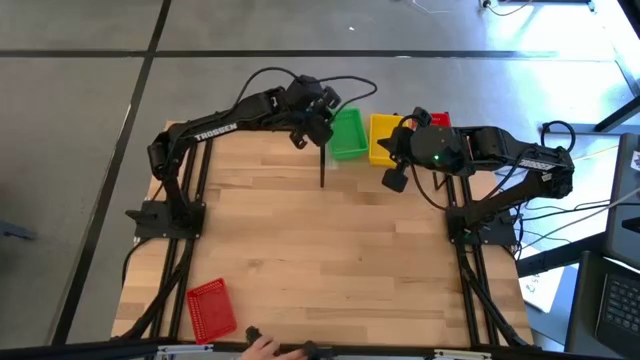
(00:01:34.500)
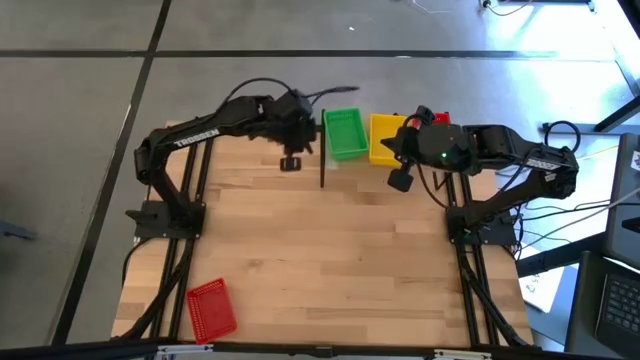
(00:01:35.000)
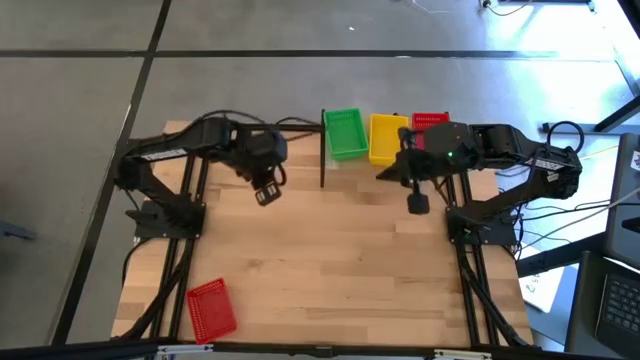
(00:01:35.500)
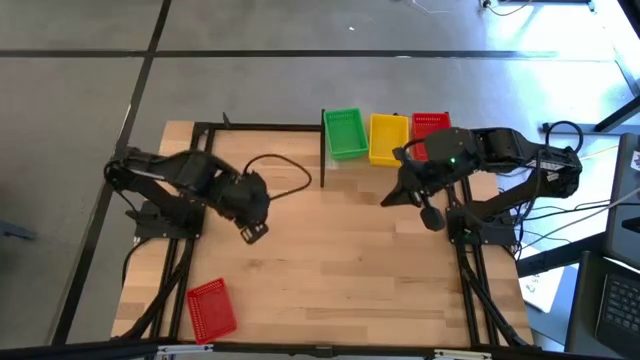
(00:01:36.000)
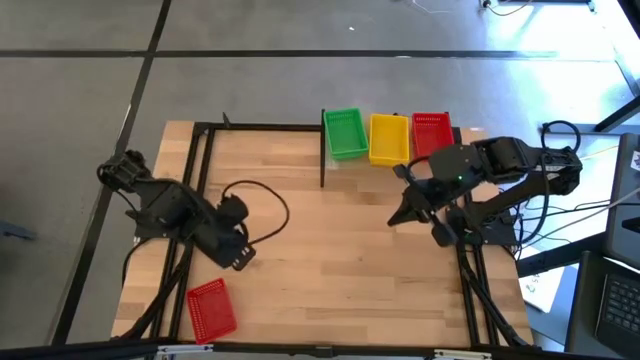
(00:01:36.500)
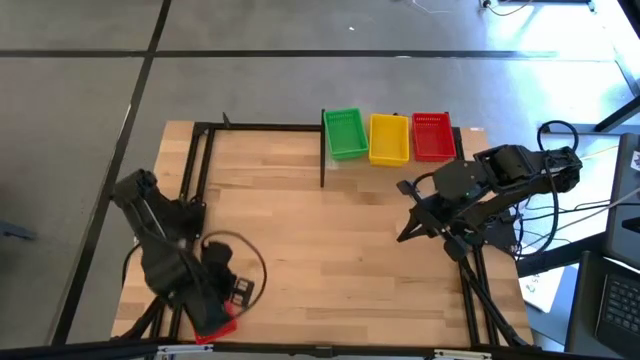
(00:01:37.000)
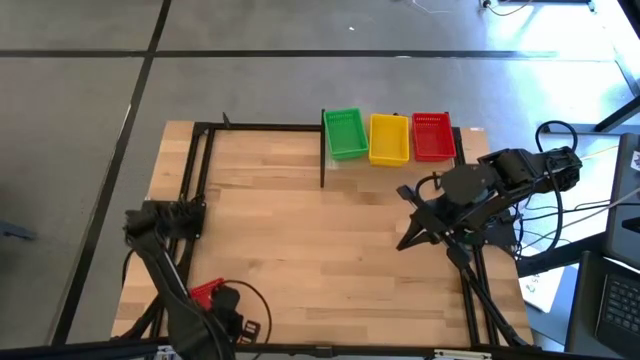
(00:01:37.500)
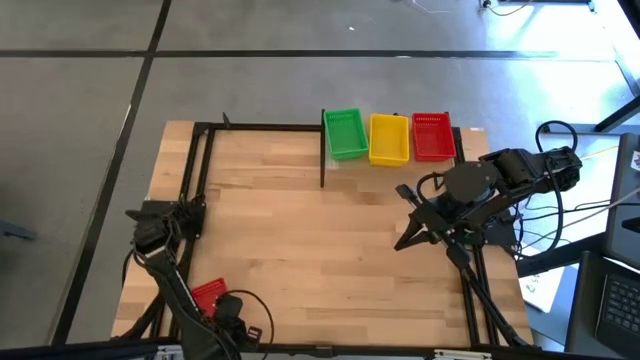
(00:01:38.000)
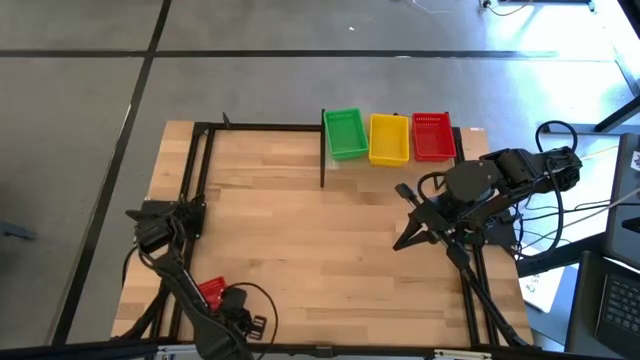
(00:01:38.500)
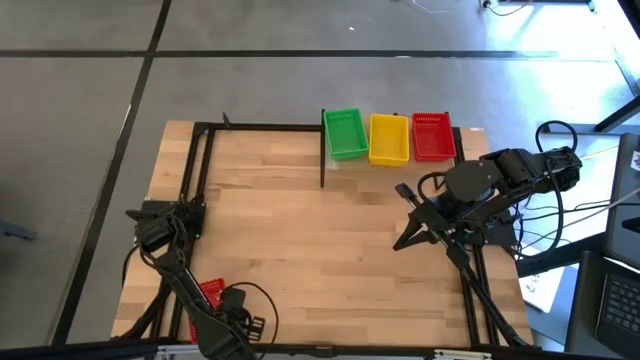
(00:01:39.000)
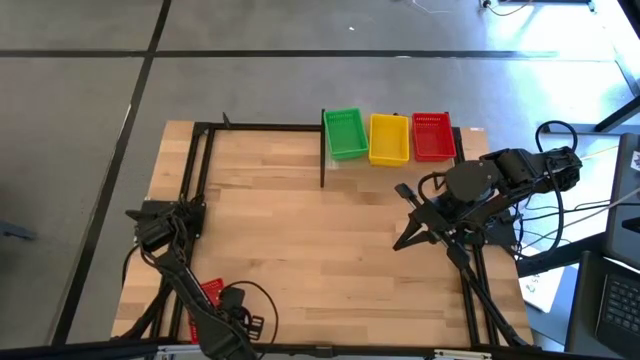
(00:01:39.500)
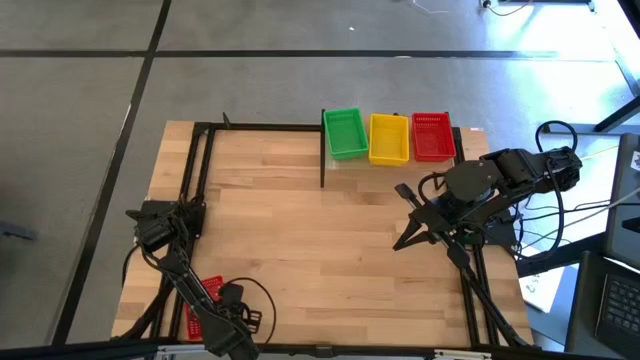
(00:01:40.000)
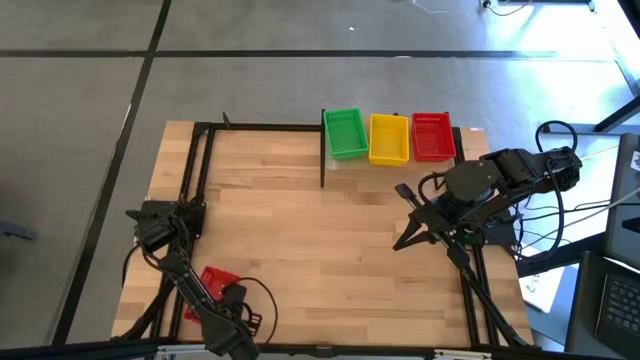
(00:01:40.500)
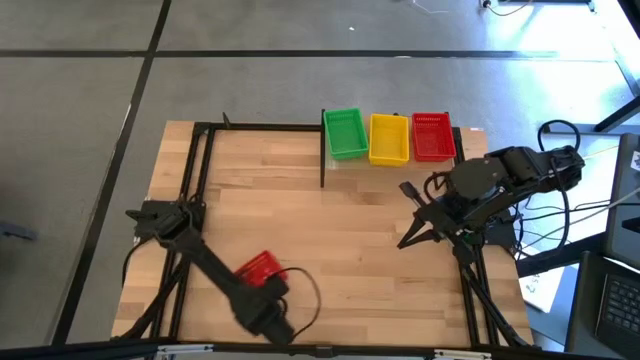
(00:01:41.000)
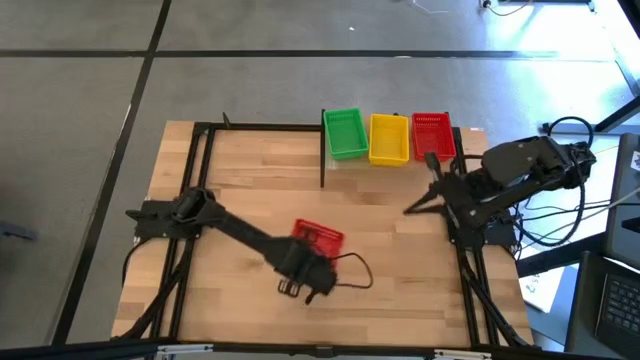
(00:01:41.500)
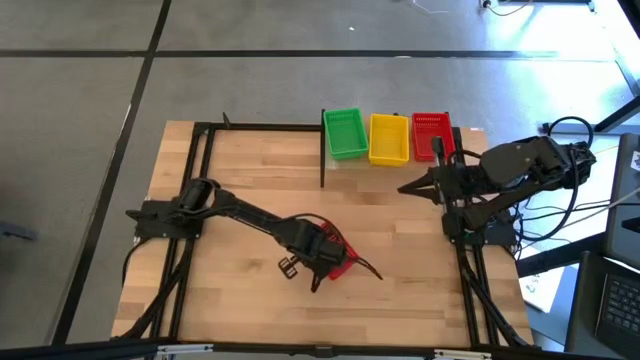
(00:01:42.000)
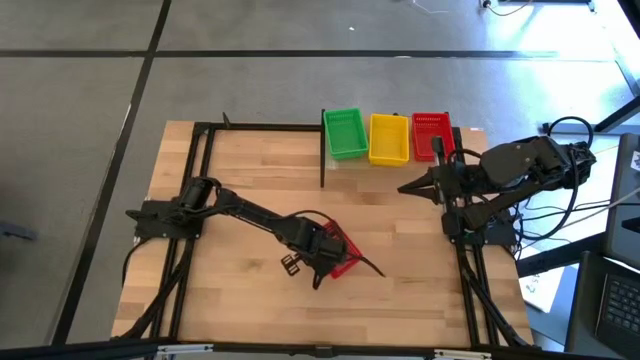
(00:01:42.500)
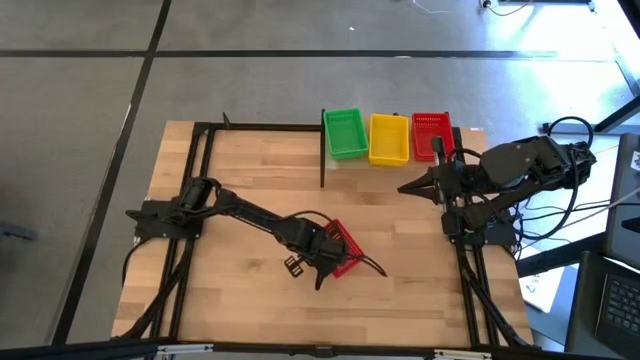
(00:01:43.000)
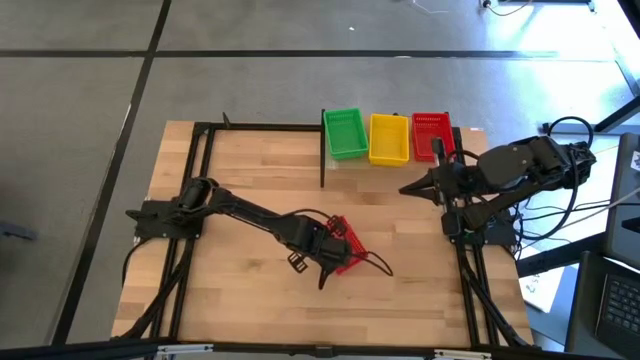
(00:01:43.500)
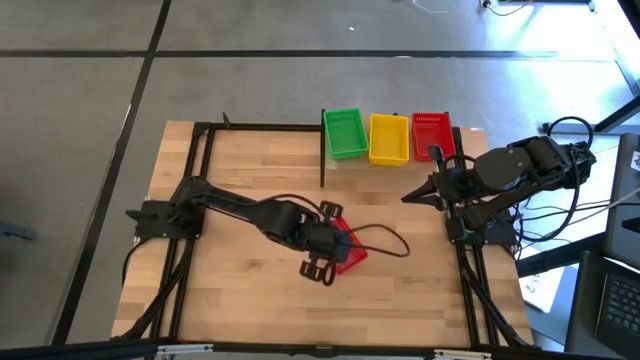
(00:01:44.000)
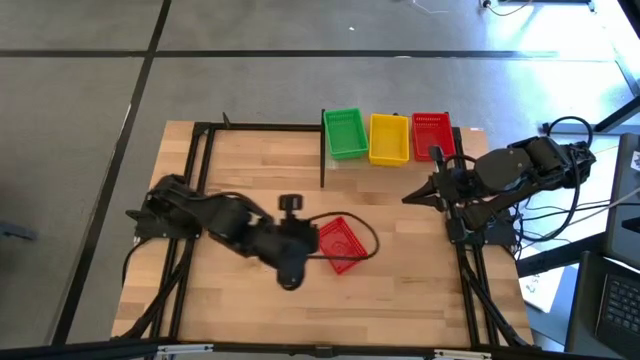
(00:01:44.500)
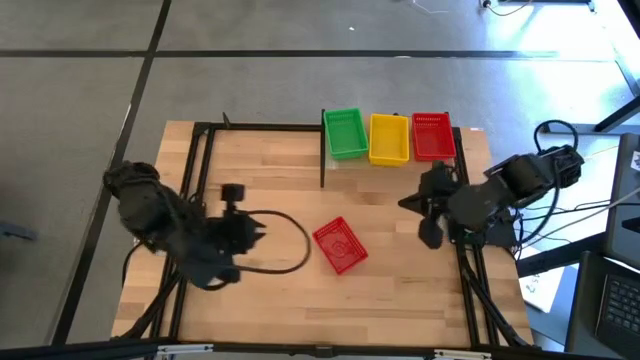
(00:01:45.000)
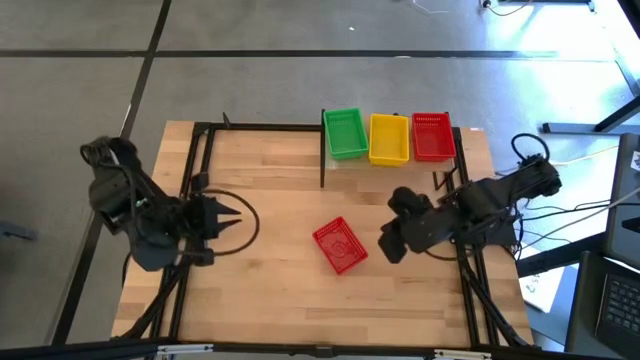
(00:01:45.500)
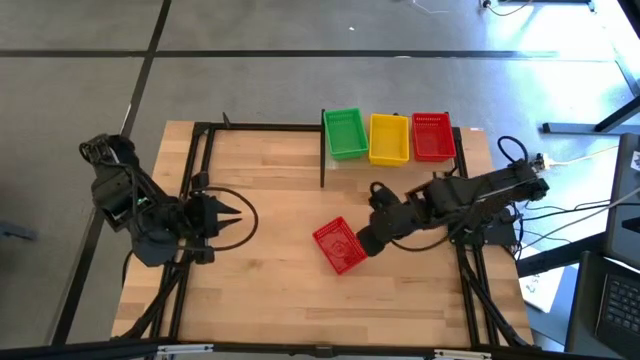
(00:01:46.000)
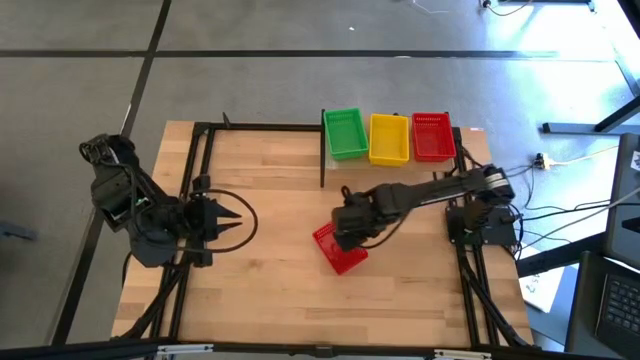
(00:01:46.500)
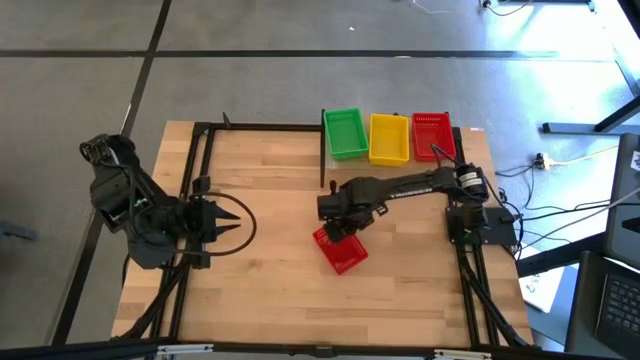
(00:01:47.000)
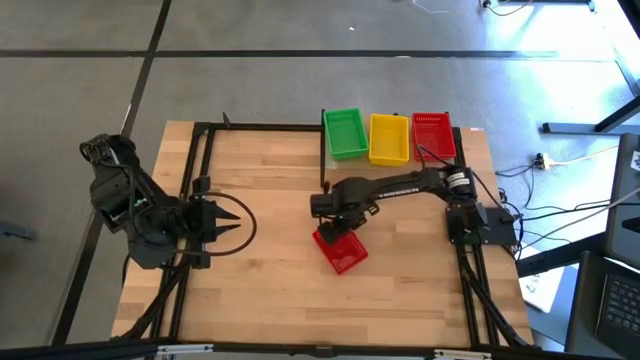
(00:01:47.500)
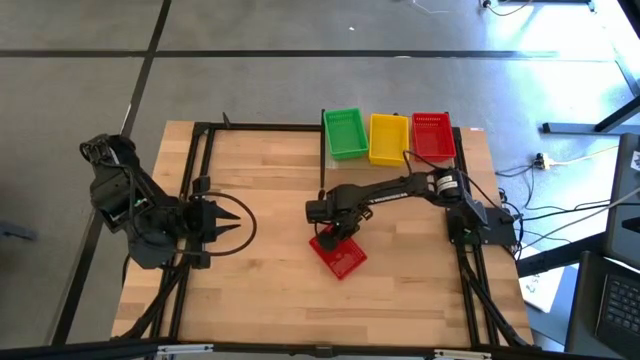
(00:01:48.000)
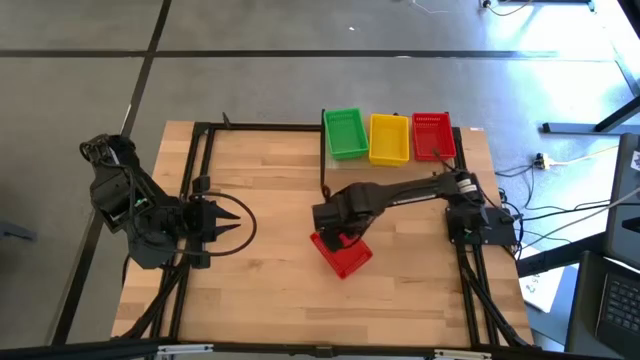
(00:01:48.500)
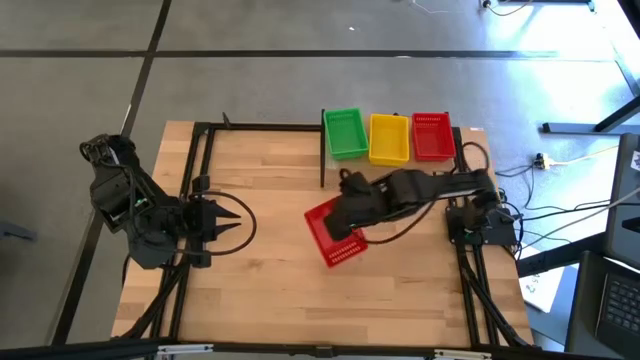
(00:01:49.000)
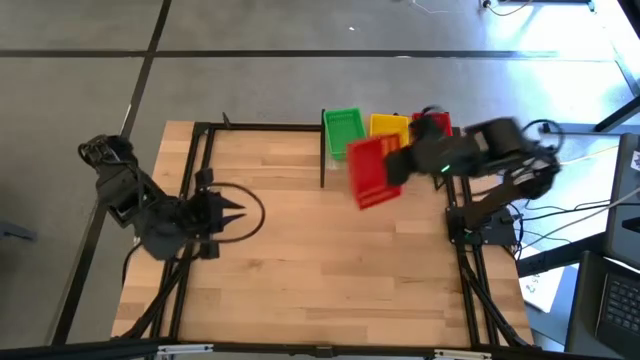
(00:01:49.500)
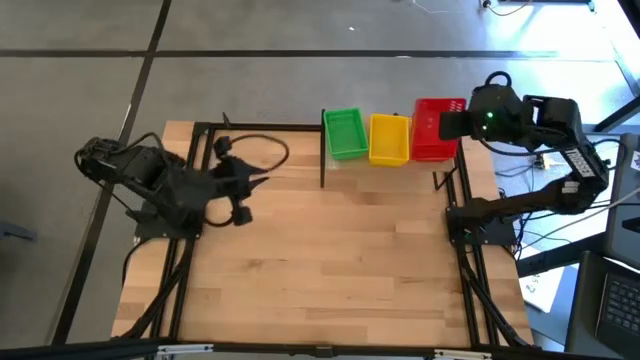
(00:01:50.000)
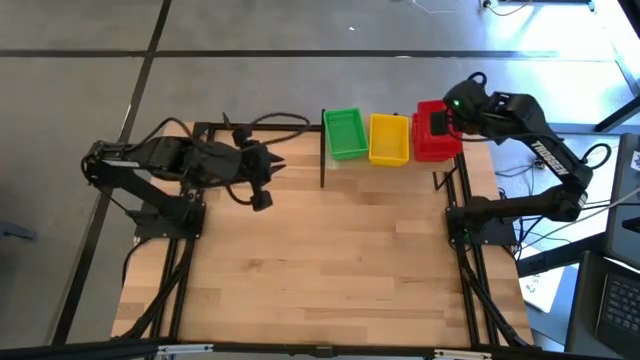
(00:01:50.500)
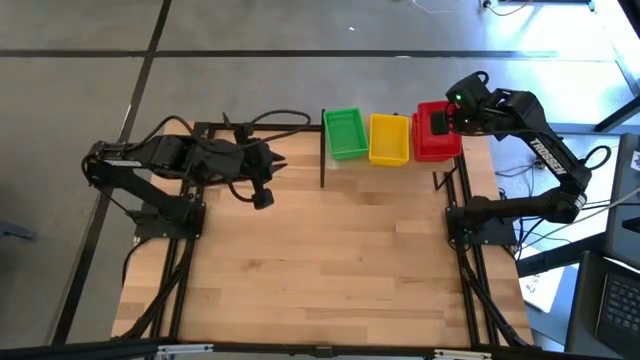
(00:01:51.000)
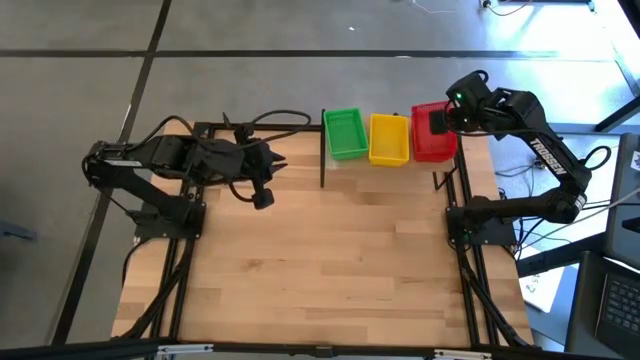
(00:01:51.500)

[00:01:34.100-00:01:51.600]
Task: Stack baskets on shelf by color
Stack the red bin on the red bins on the shelf

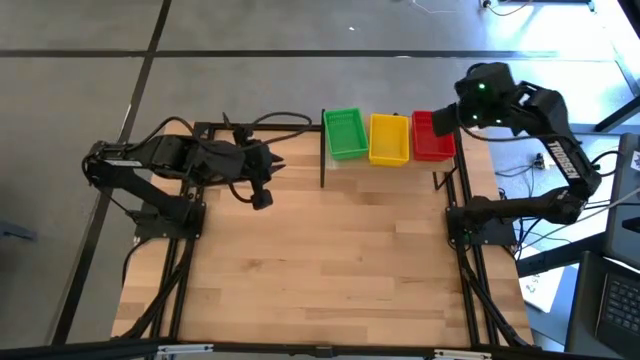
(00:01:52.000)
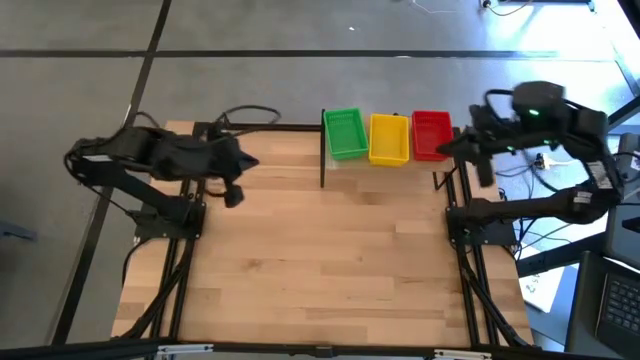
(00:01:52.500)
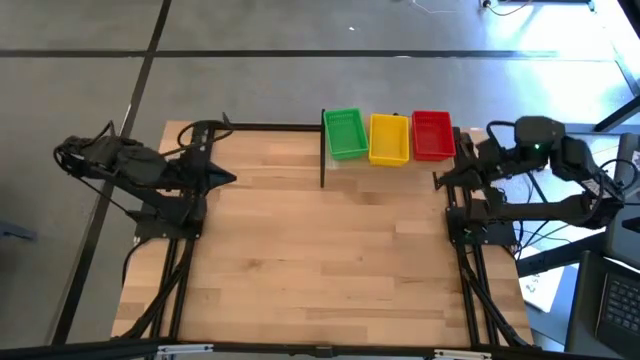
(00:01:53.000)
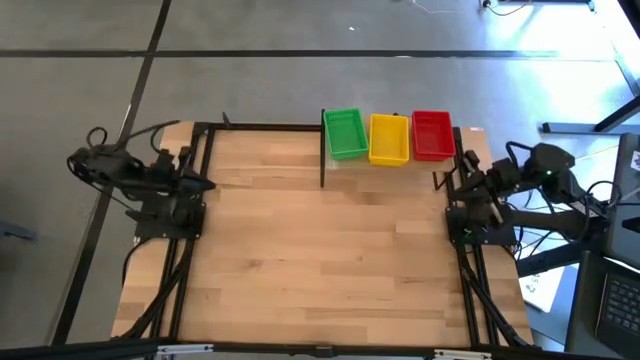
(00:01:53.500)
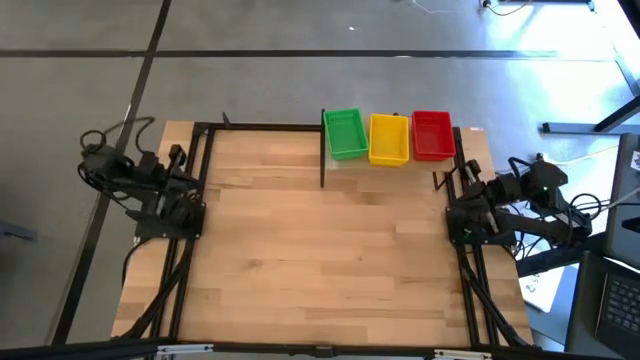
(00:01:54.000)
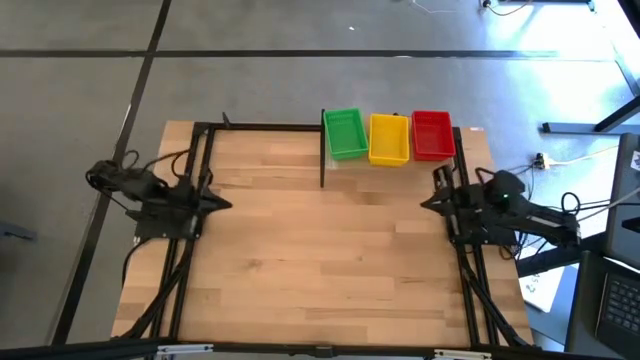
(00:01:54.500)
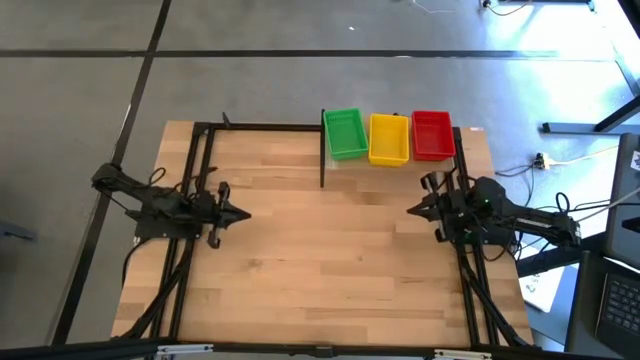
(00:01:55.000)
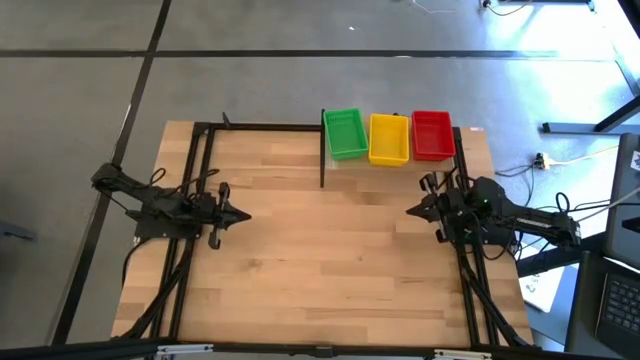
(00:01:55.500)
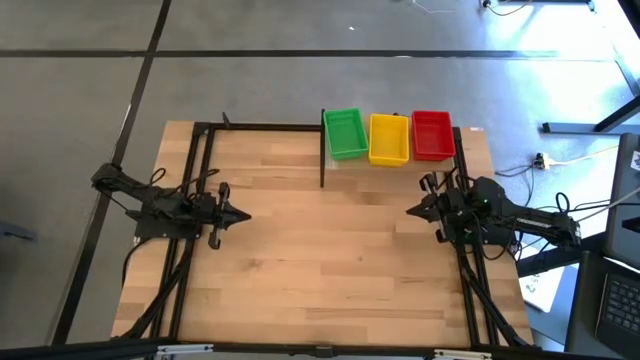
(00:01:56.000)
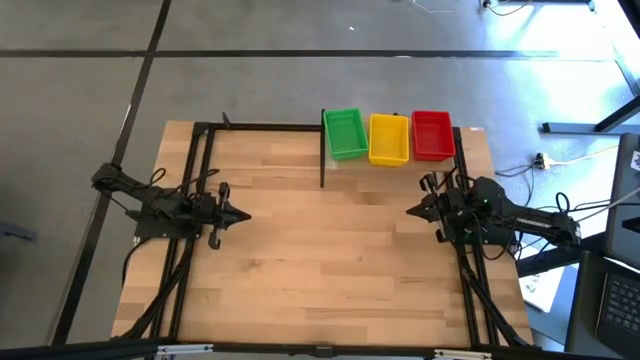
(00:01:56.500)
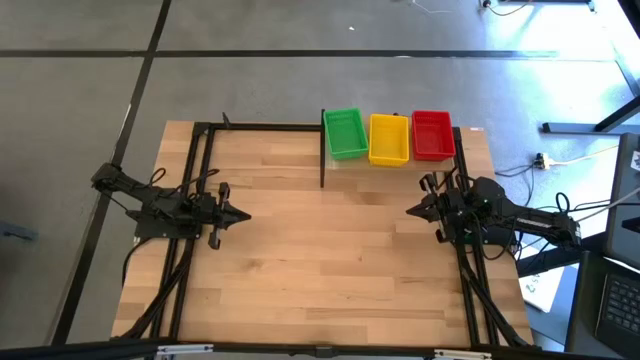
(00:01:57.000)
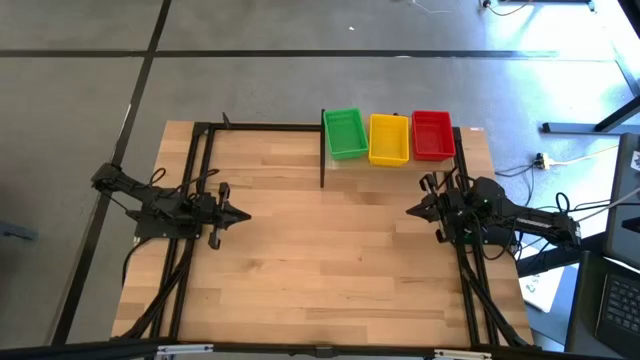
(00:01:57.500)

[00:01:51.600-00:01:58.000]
Return to Home Position
